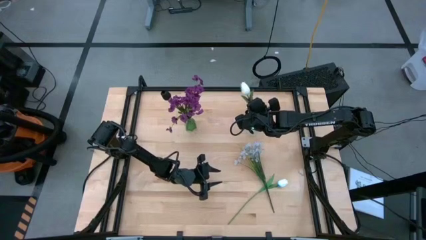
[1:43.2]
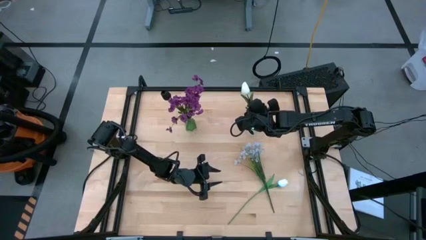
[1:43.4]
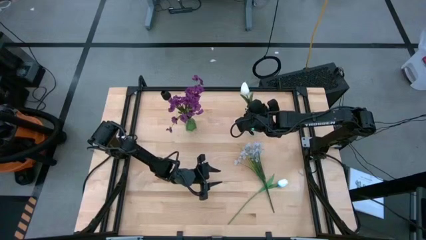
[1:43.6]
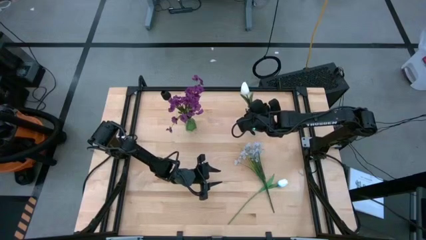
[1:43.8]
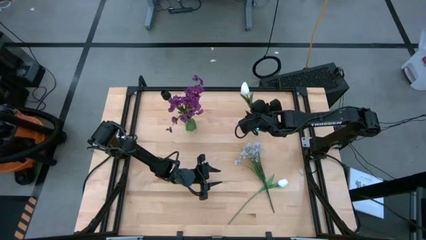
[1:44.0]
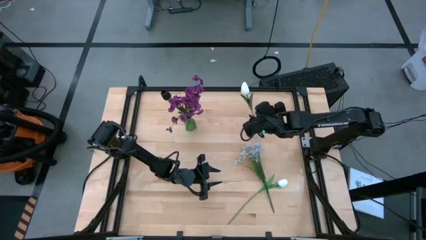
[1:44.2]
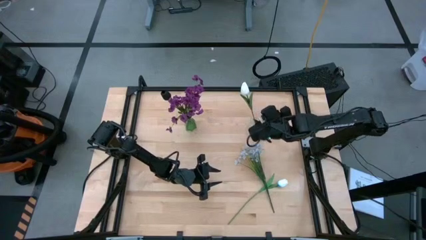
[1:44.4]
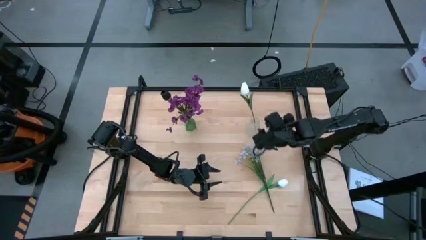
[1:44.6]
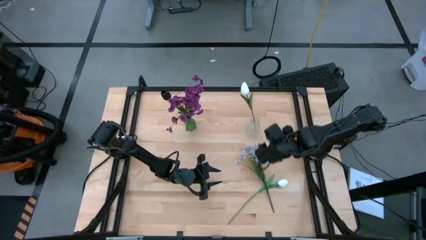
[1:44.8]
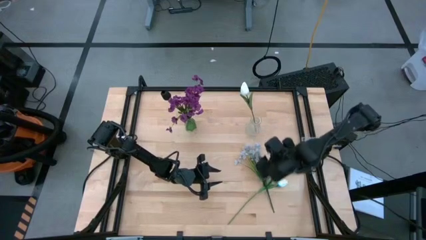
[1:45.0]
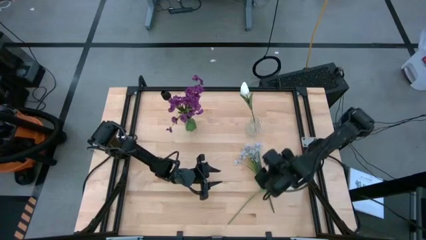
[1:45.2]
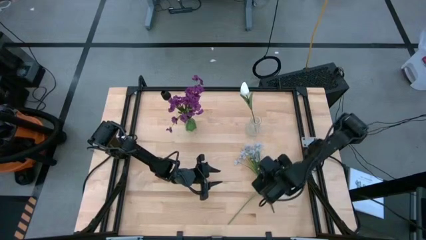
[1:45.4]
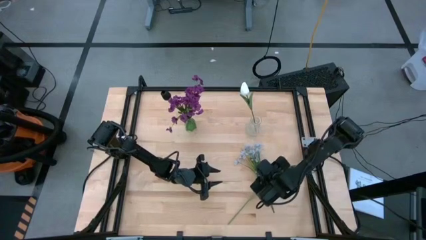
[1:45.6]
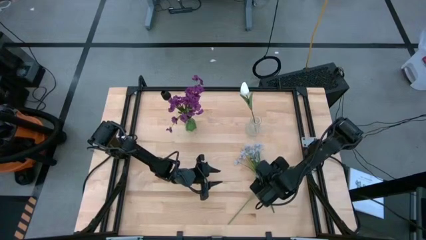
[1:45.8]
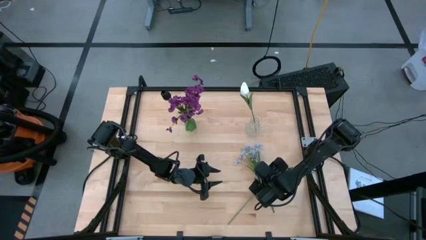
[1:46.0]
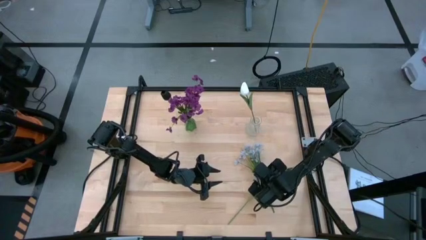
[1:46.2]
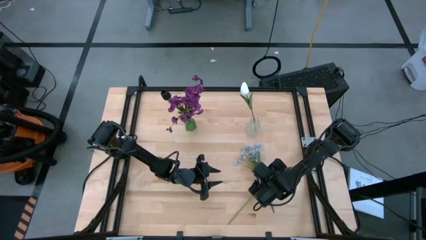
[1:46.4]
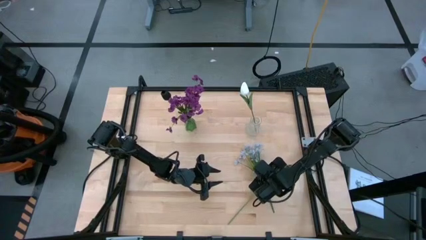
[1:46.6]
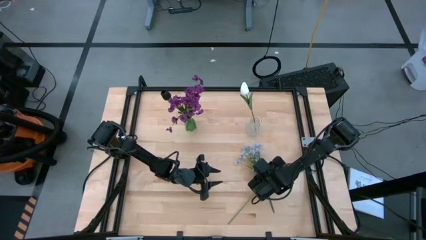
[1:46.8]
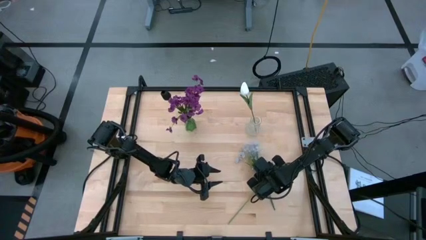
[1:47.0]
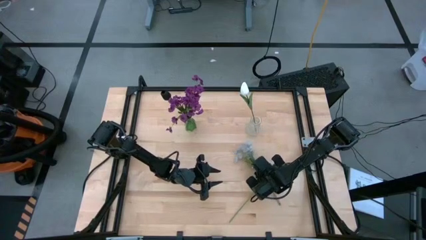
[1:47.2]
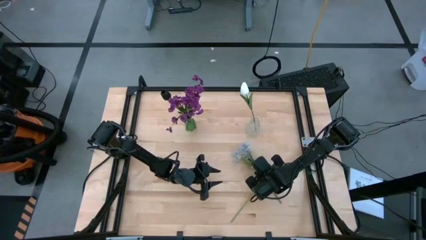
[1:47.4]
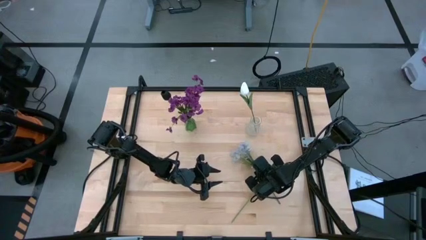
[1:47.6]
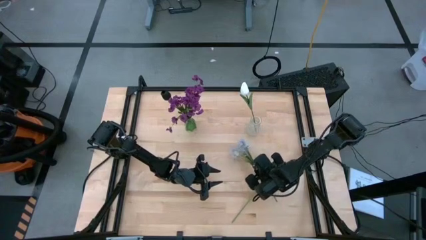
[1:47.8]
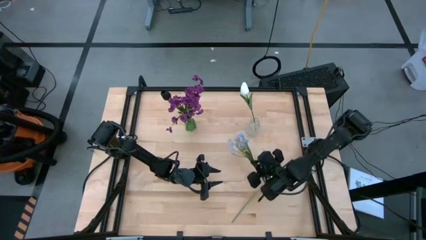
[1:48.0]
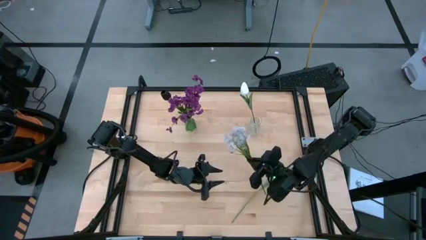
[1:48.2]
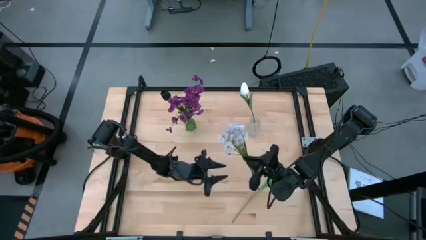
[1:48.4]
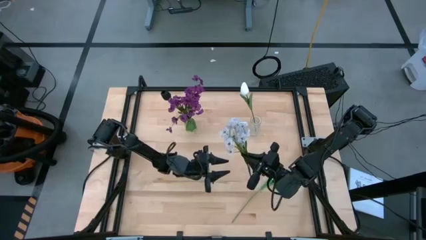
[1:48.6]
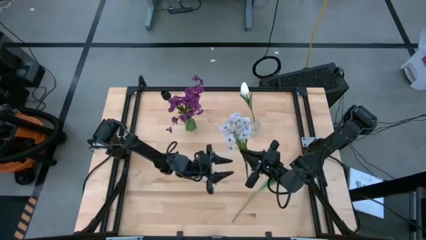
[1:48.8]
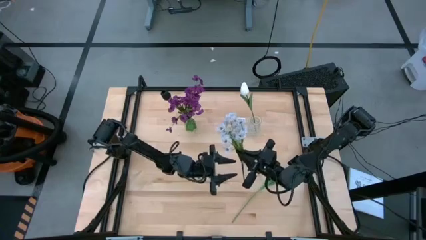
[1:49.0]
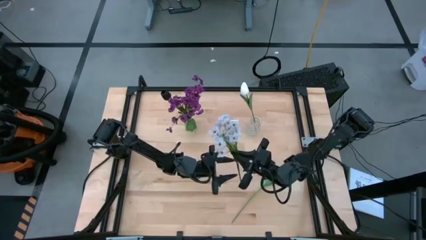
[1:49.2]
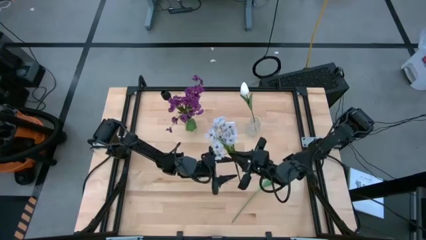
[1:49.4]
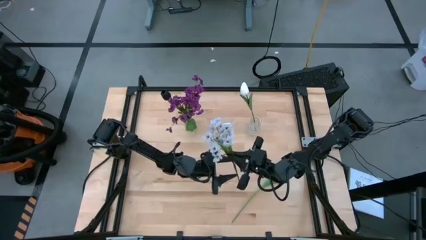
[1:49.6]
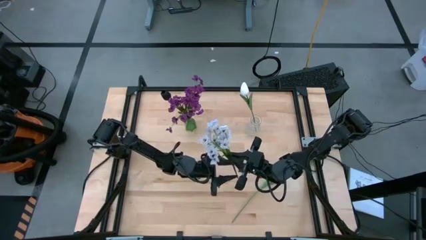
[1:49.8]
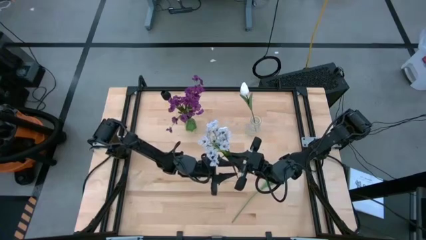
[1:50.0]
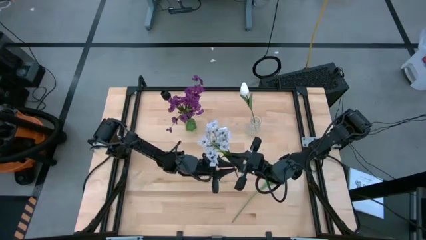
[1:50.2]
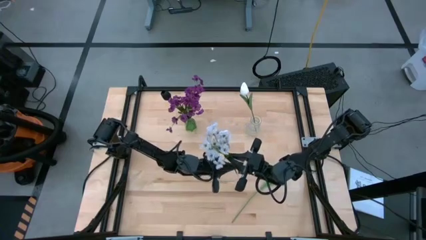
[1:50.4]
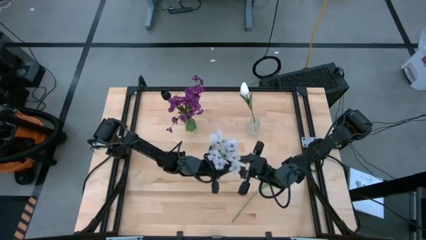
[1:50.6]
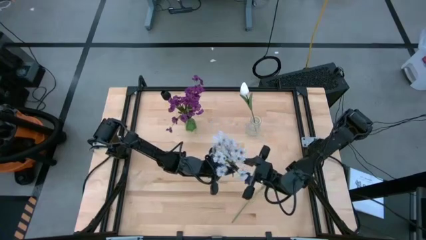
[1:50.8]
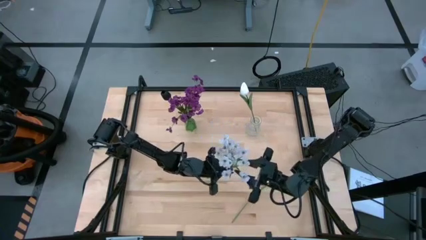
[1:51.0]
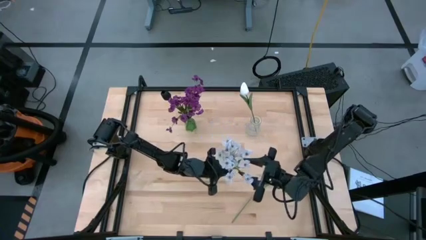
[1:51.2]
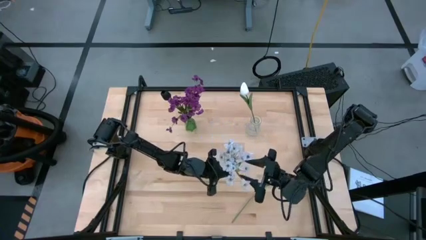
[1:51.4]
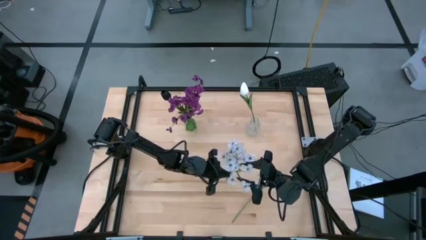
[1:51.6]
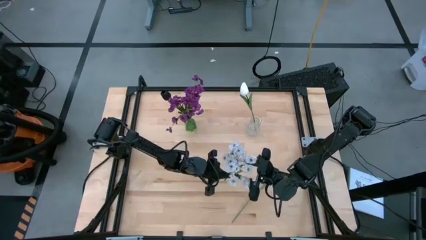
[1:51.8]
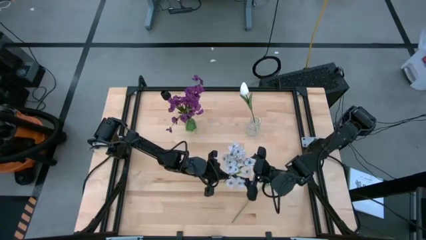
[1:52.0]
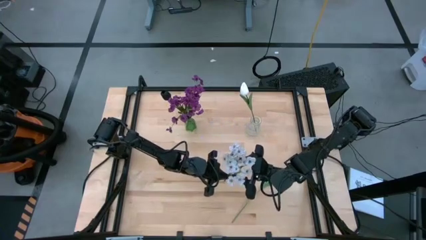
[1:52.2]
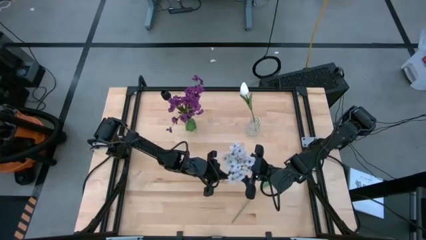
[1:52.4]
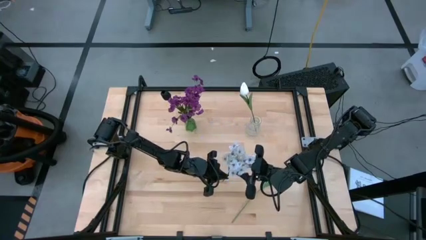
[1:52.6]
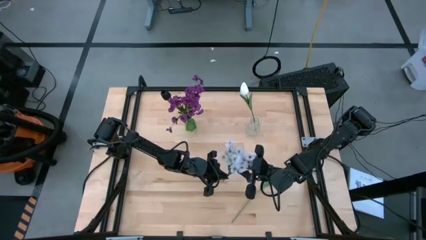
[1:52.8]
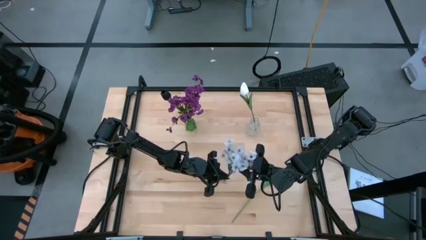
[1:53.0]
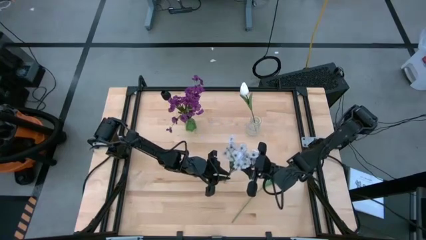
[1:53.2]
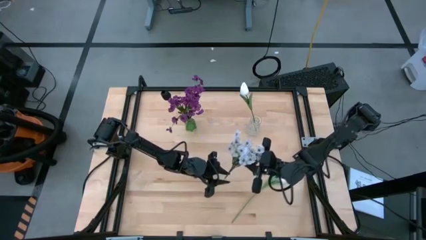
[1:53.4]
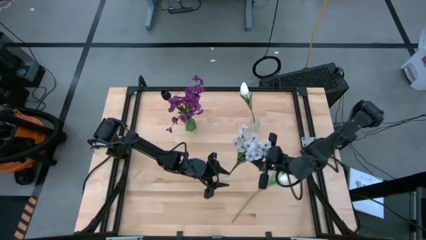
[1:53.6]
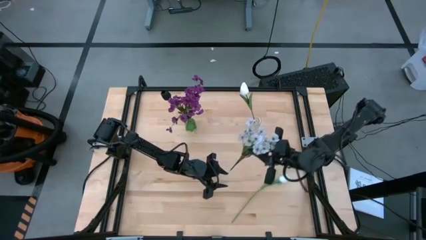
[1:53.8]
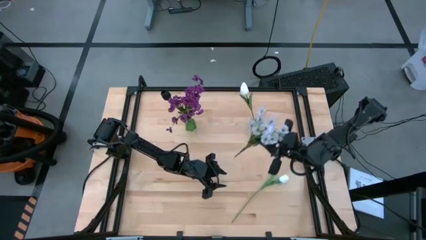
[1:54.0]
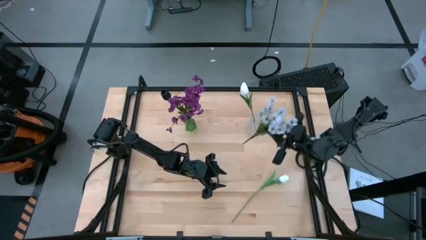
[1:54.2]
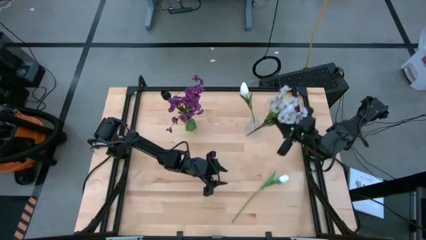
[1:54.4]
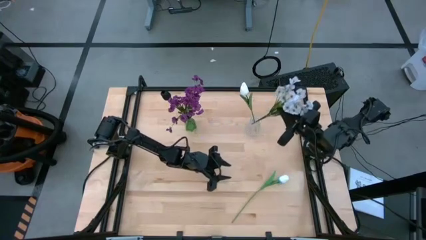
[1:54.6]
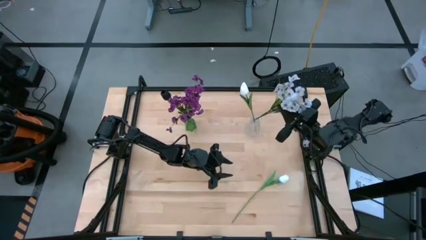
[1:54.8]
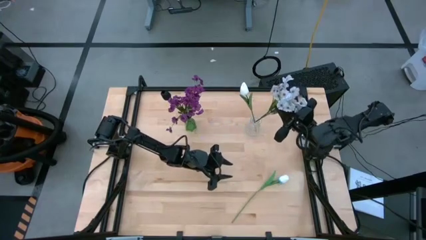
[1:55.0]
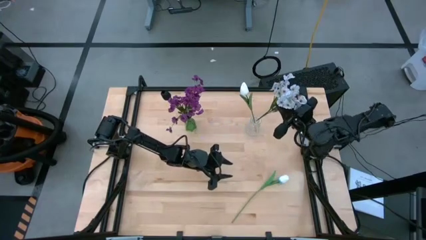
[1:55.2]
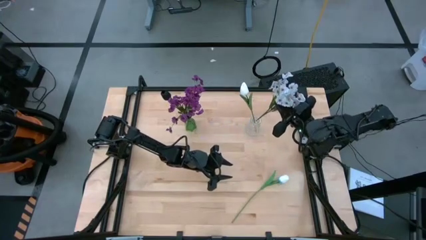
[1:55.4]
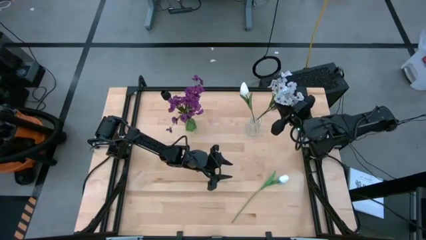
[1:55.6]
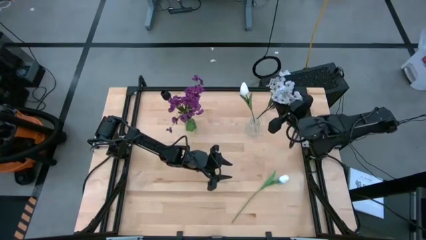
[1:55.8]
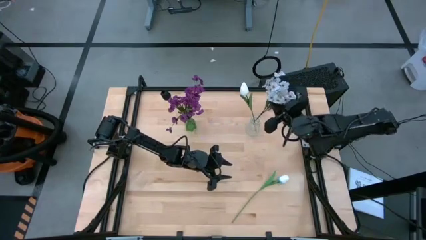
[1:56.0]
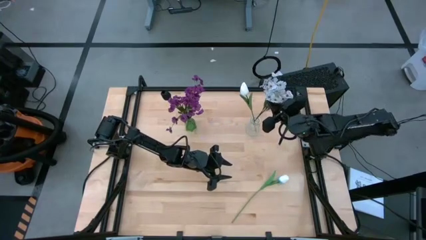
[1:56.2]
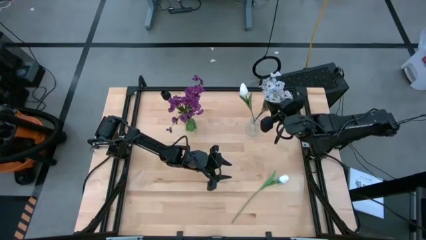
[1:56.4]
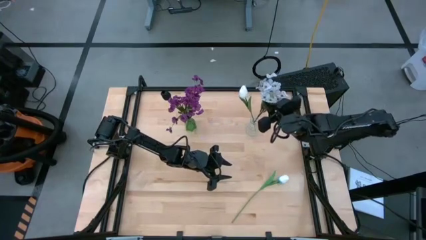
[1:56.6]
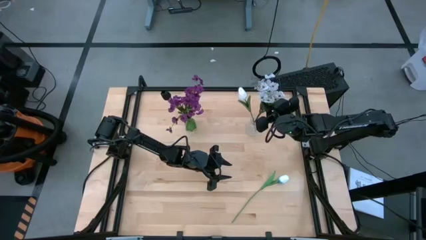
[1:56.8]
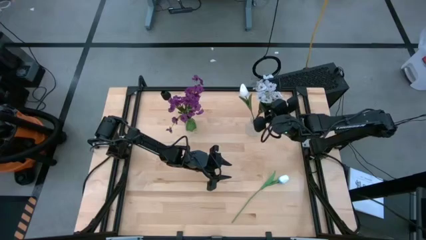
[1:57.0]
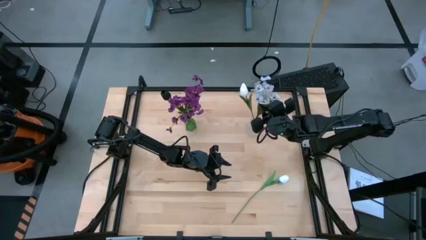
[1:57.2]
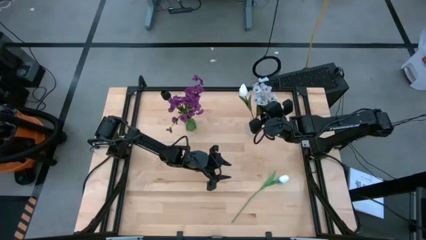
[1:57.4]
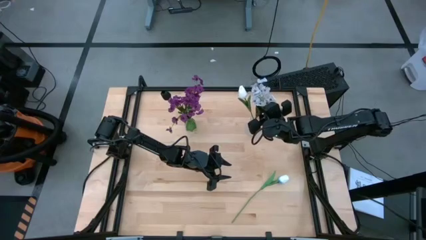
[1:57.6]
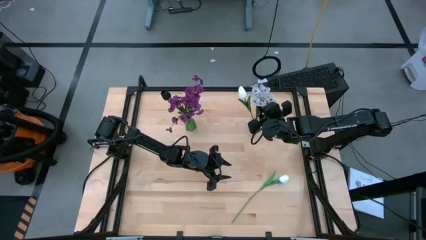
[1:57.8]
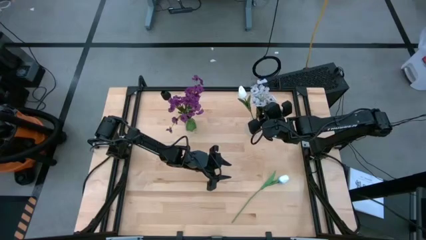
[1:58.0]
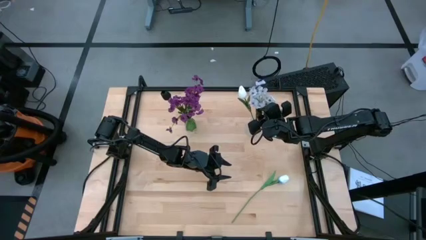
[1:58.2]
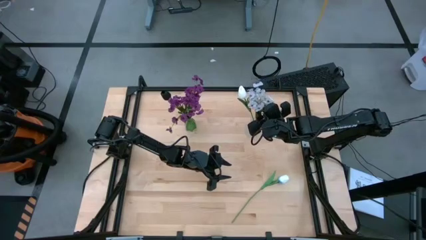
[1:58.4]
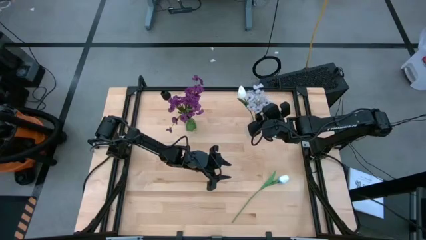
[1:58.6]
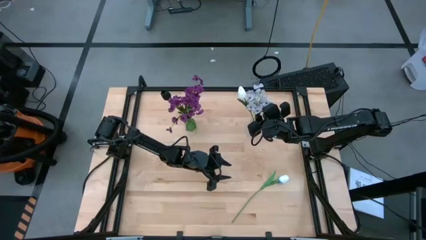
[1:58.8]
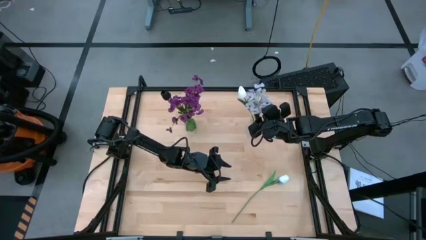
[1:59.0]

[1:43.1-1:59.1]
Task: Sort flowers into vase by color
Put the white flowers into the transparent vase
